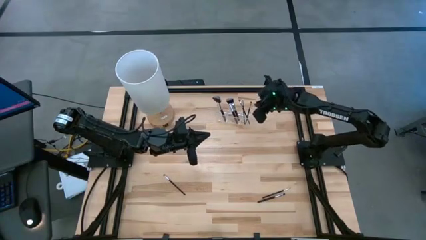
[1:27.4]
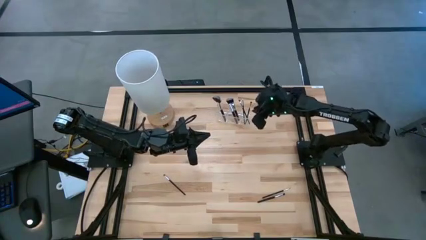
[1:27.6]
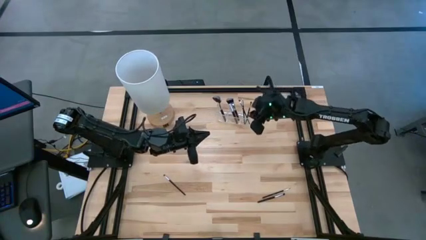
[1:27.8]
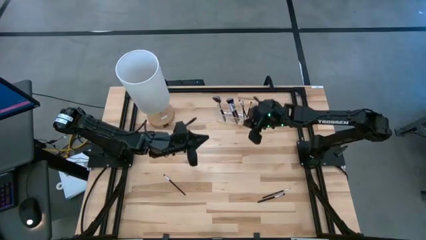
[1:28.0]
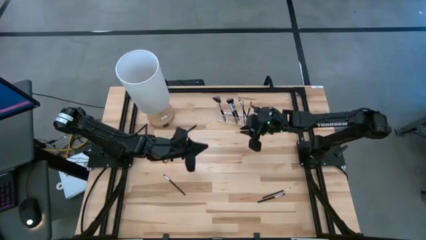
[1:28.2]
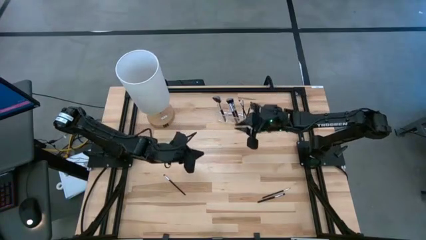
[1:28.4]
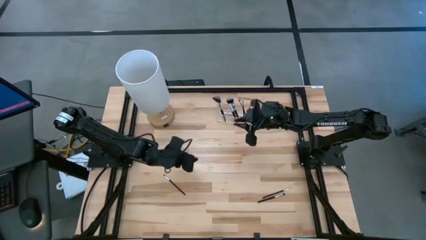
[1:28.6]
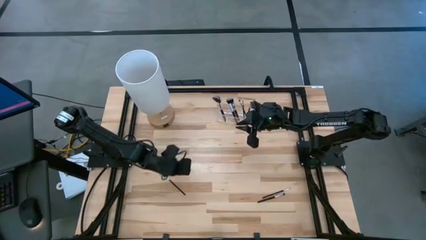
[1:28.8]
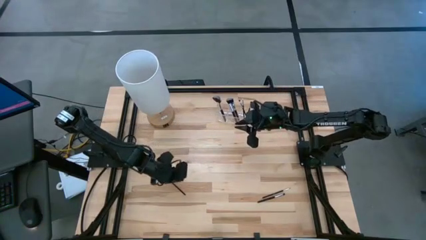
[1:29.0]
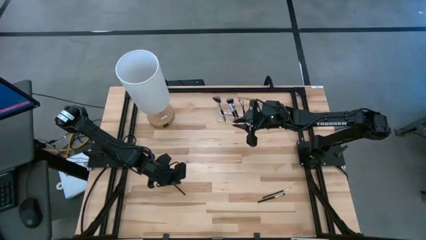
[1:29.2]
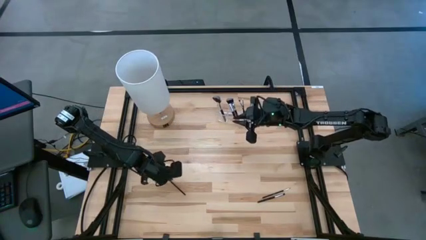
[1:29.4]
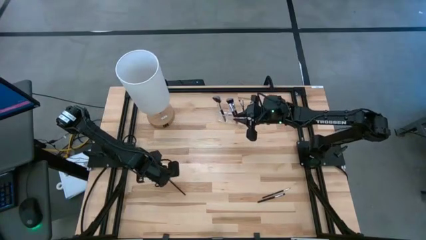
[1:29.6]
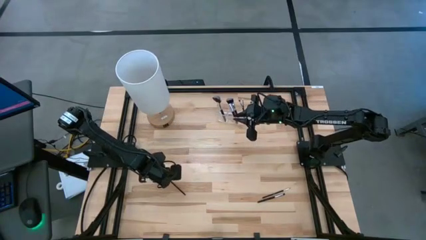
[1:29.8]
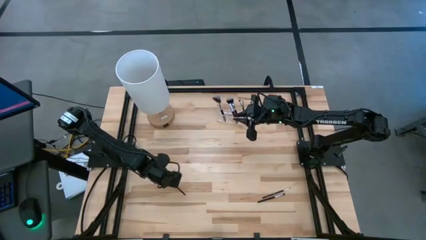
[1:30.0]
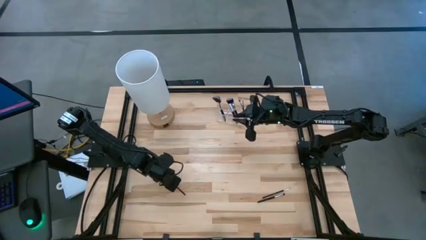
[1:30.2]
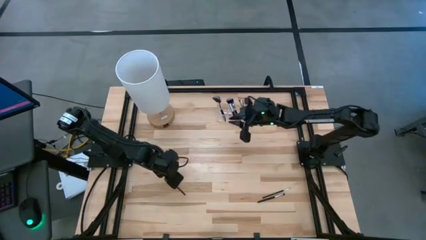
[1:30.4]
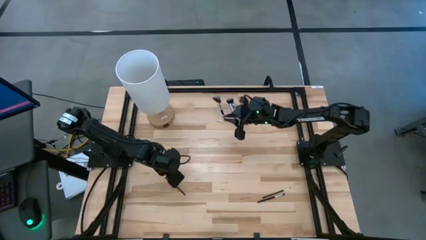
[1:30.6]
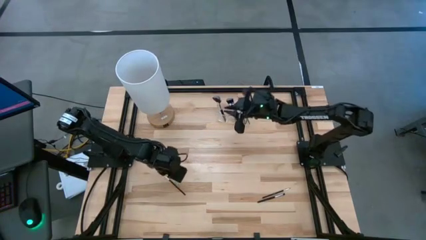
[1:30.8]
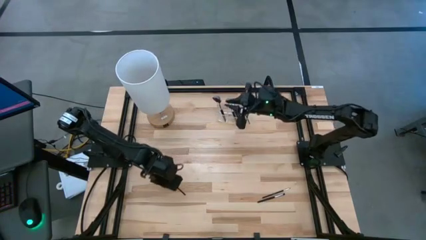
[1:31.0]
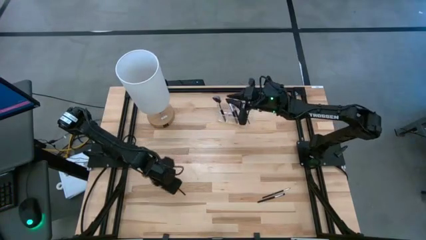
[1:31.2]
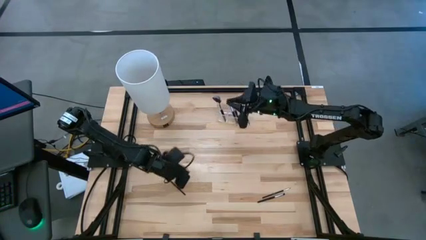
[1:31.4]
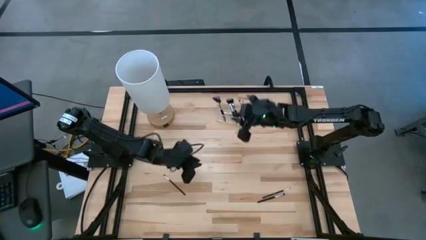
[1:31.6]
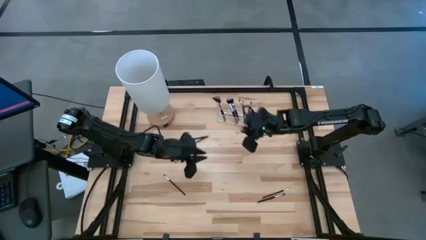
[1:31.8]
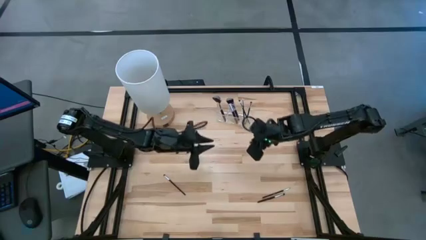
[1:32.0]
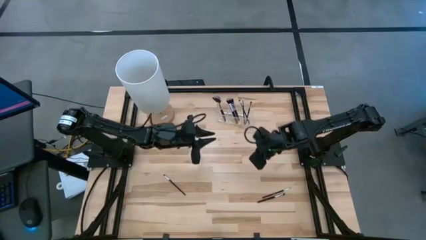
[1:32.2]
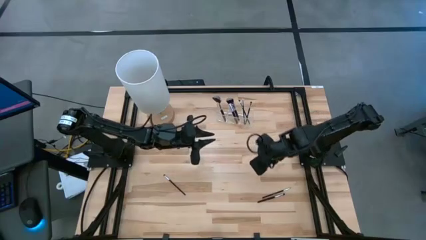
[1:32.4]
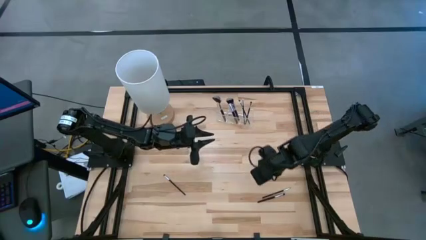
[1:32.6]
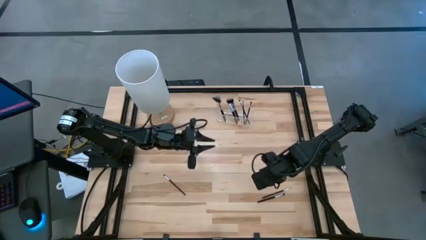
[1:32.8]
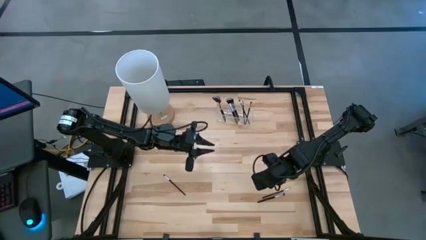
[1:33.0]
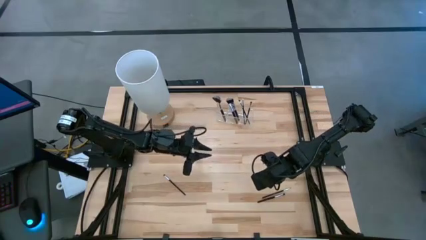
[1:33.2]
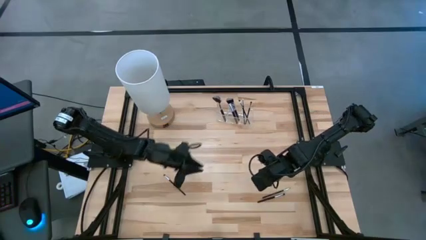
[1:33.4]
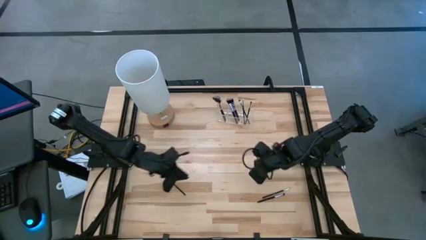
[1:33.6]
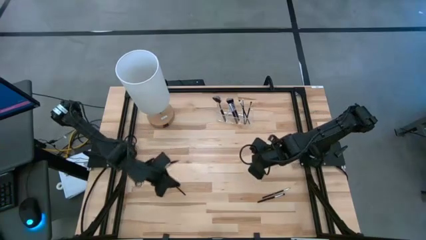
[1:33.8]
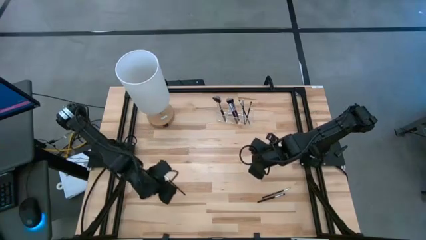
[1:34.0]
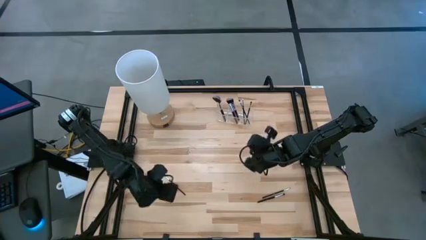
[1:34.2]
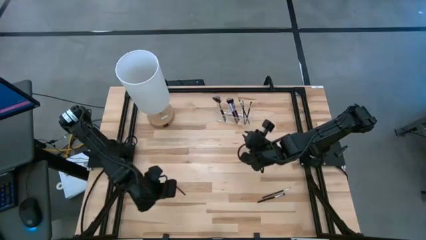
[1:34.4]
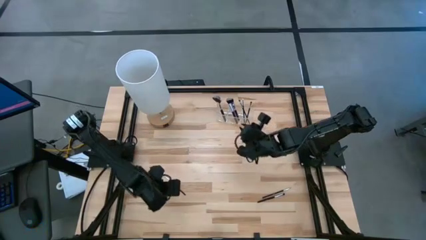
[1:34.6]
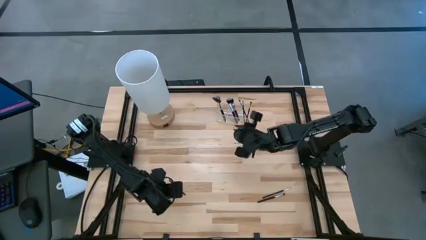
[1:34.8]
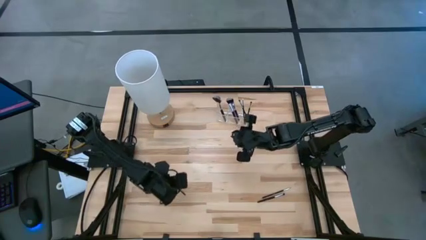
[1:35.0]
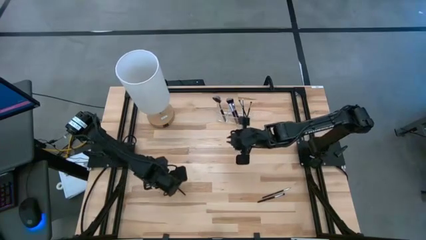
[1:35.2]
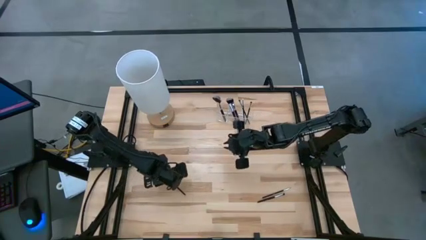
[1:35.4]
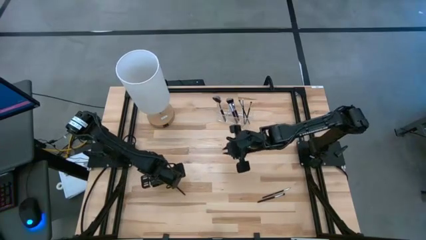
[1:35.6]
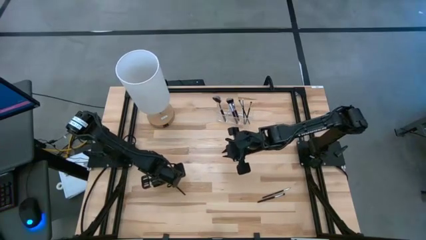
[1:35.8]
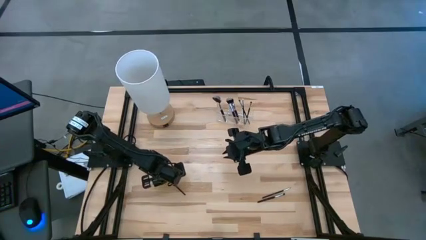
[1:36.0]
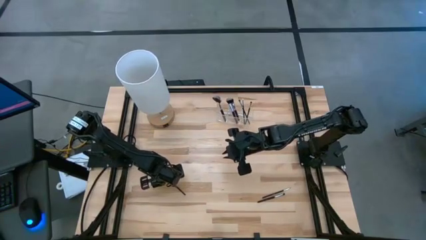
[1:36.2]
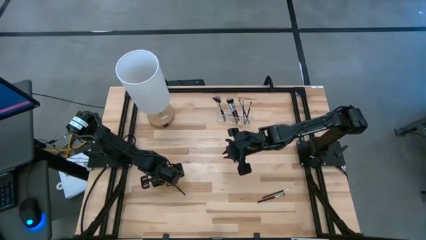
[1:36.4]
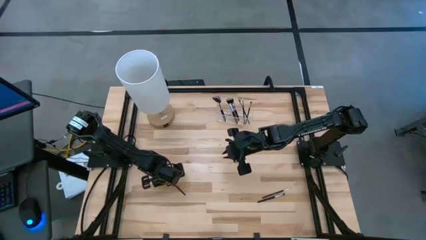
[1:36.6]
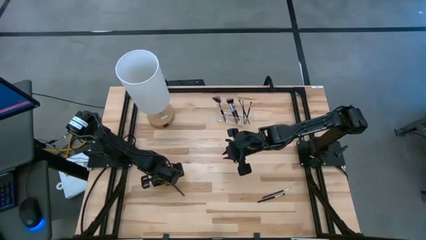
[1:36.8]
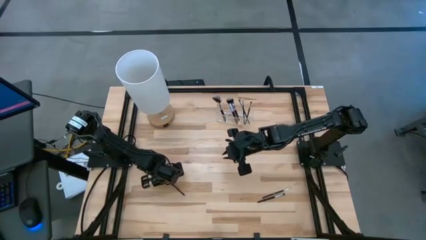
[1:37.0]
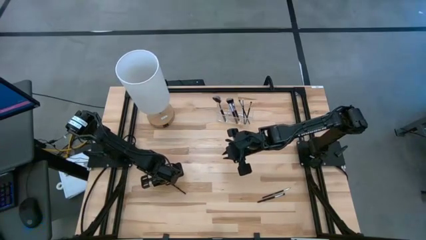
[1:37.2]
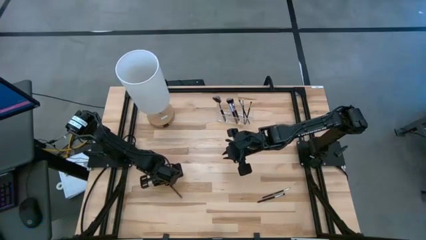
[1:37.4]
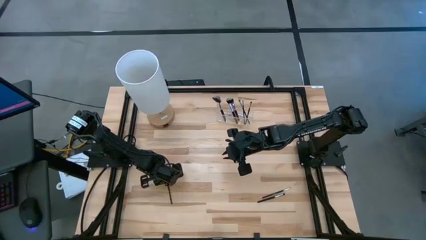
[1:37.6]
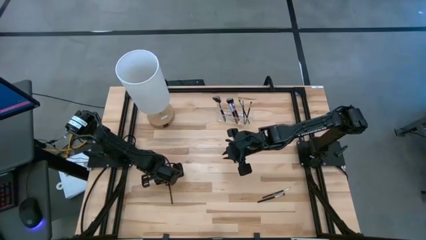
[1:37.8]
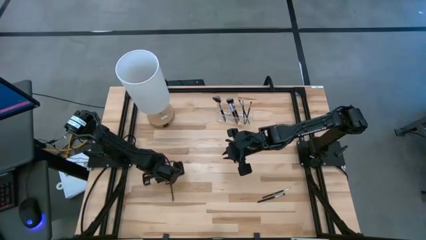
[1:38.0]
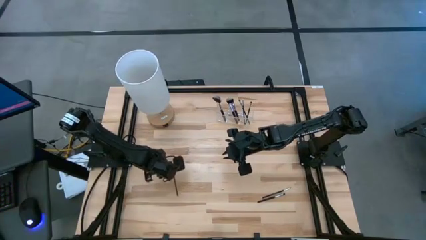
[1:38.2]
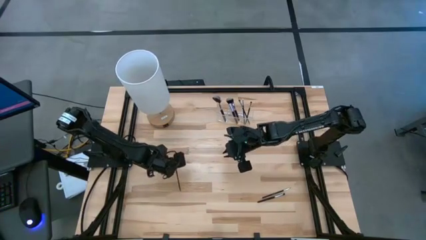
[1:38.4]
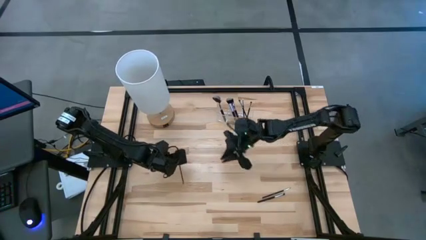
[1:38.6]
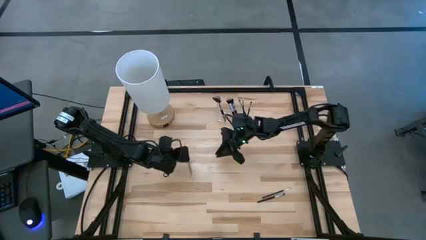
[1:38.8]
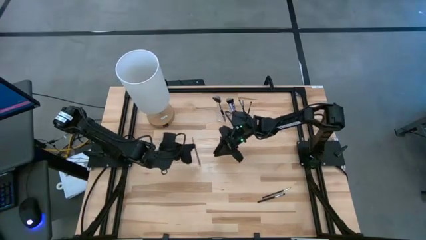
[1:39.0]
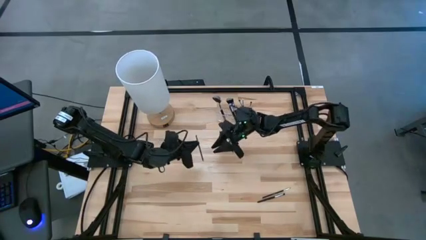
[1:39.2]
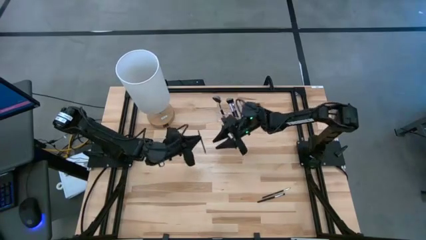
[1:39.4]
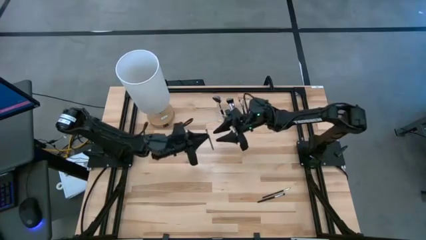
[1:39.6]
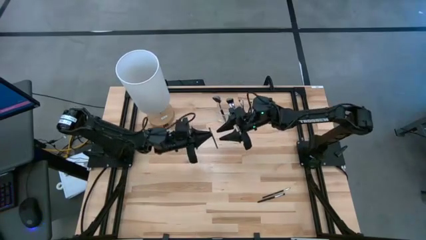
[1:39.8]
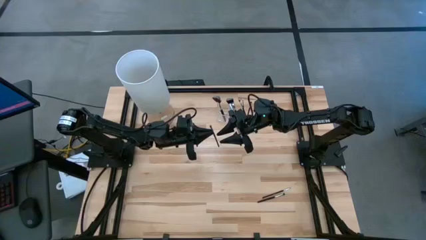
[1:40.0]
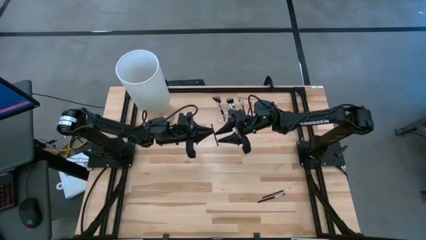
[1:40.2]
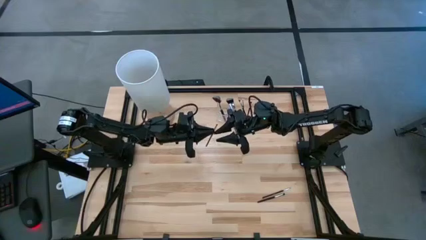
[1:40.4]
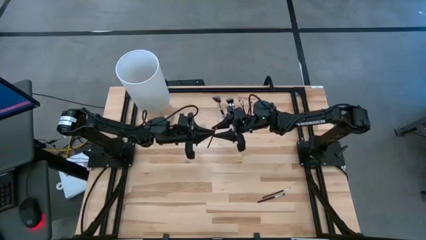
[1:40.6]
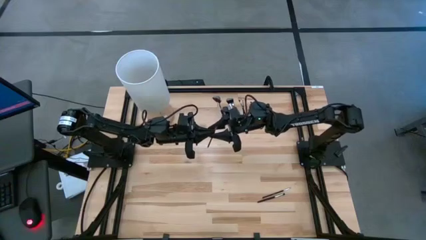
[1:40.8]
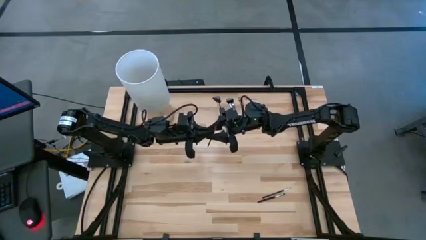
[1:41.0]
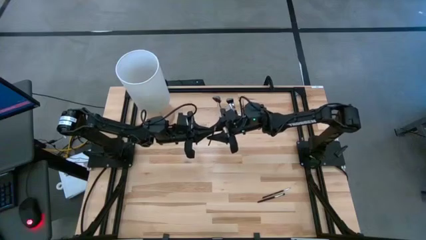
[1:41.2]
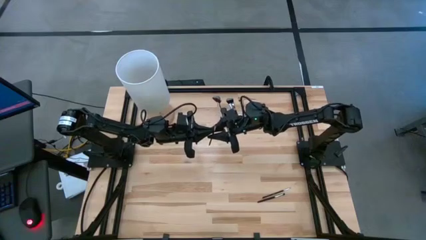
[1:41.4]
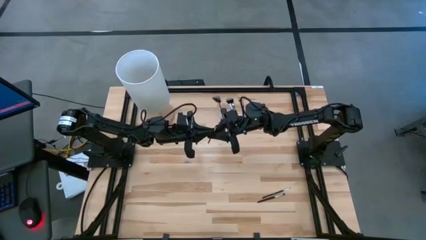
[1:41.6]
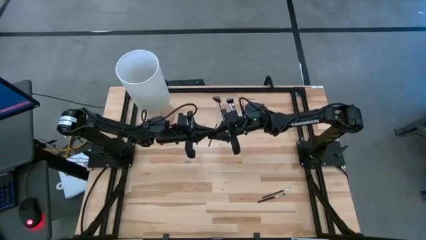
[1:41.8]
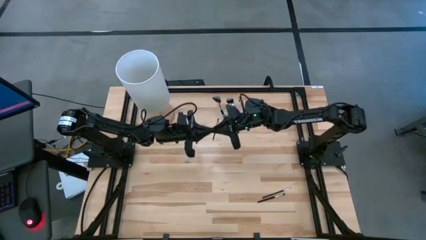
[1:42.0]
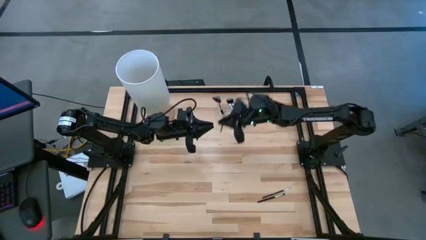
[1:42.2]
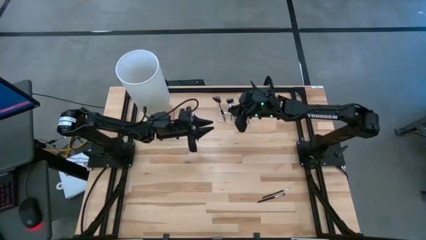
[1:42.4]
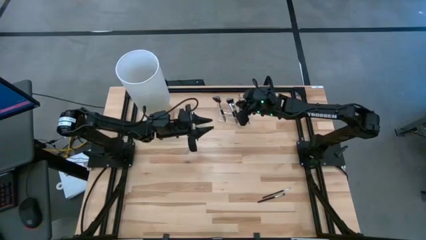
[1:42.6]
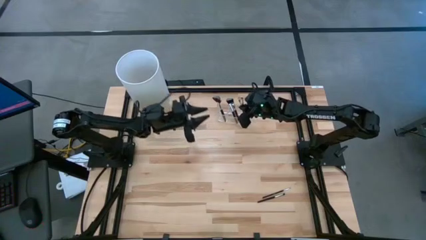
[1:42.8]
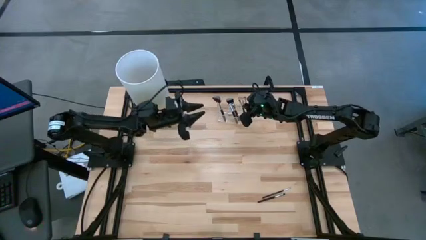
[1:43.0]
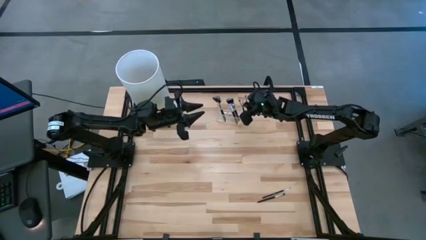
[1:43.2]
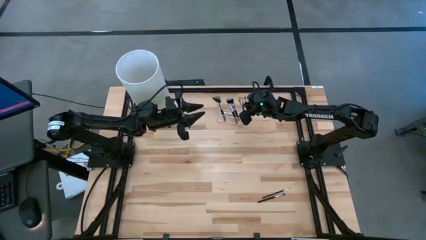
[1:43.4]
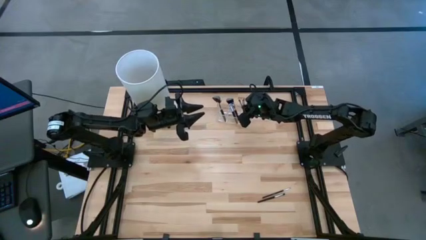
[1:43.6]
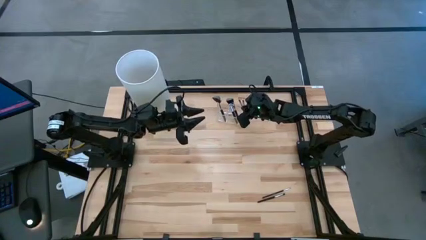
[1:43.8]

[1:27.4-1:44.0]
Task: Put items in baskets/containers
Put the black eyeshadow brush into the transparent organizer
